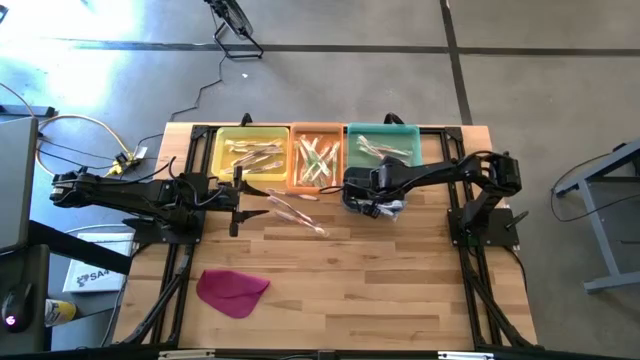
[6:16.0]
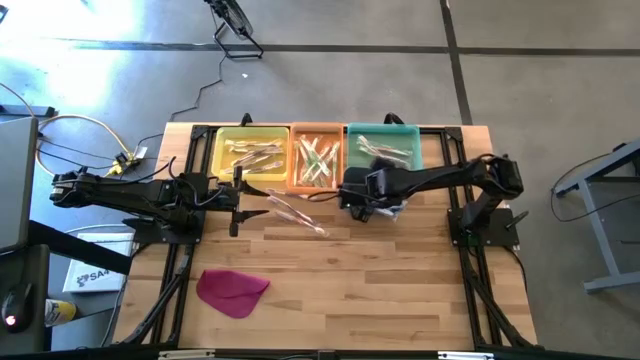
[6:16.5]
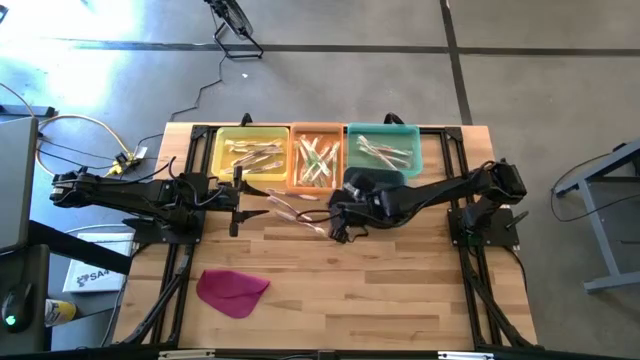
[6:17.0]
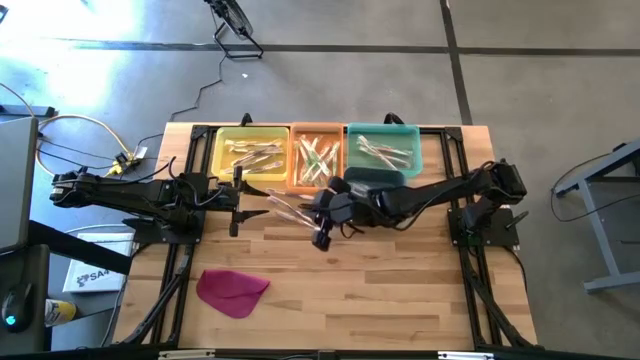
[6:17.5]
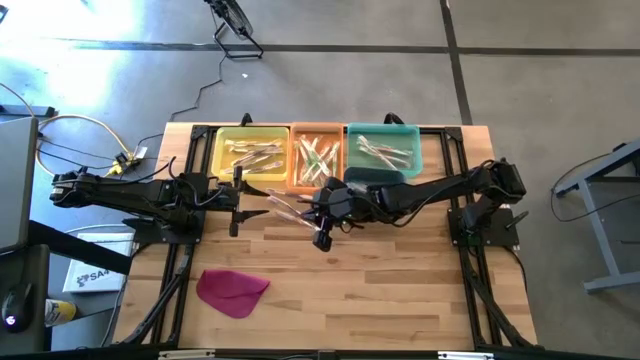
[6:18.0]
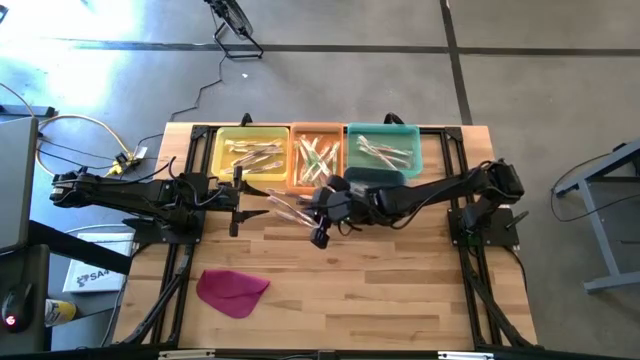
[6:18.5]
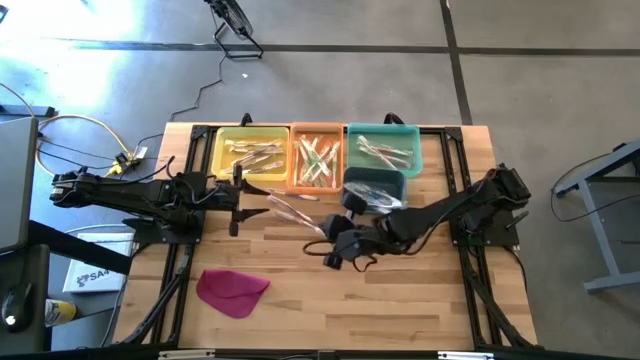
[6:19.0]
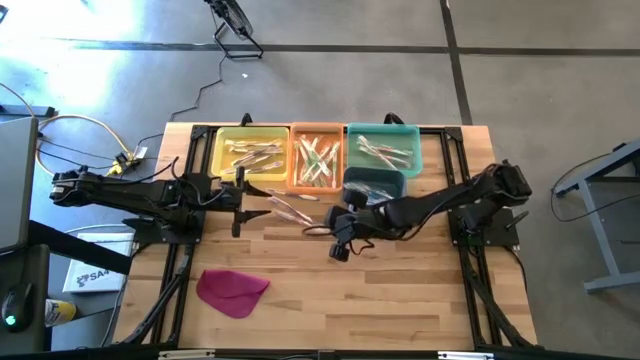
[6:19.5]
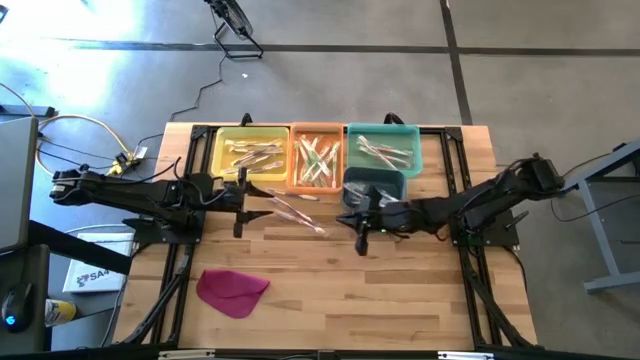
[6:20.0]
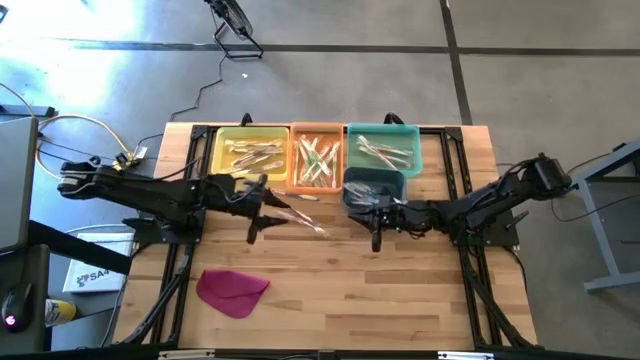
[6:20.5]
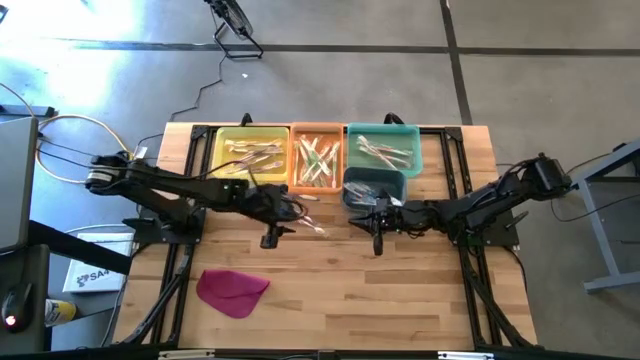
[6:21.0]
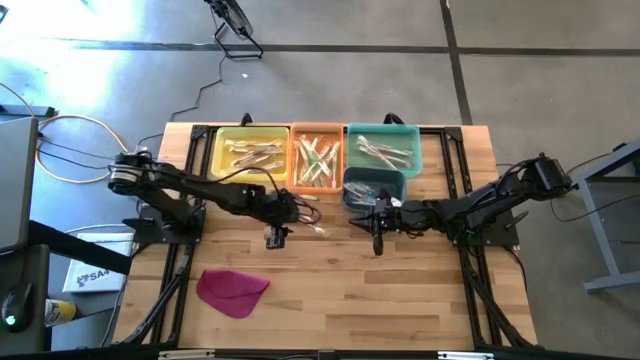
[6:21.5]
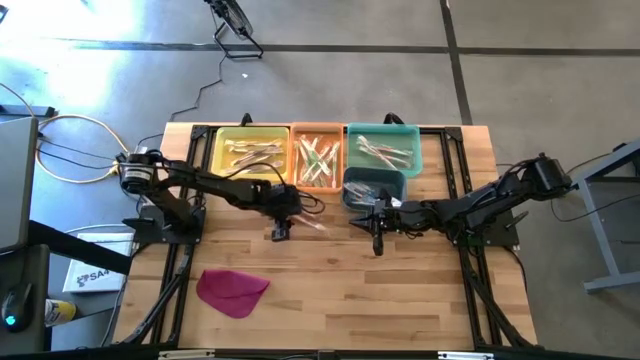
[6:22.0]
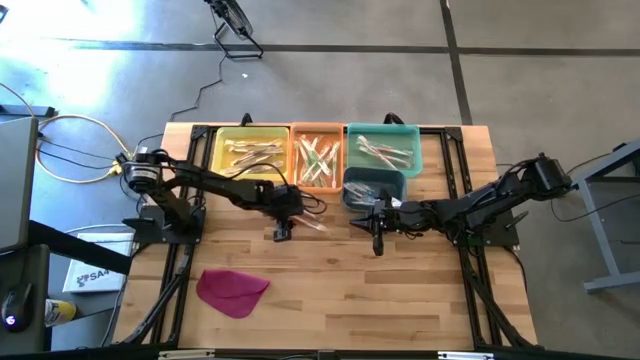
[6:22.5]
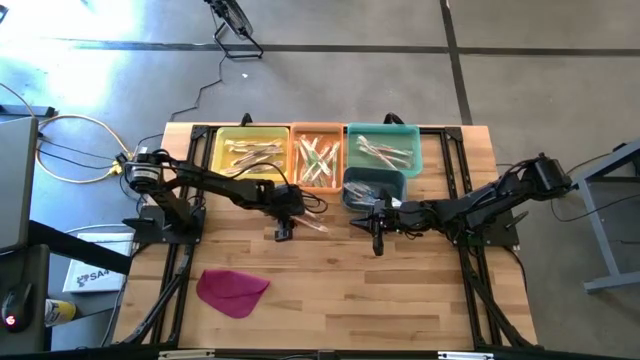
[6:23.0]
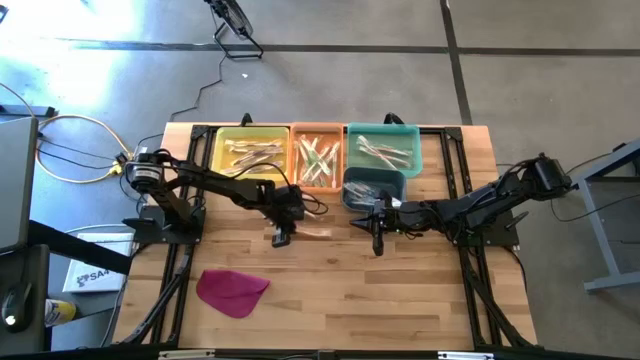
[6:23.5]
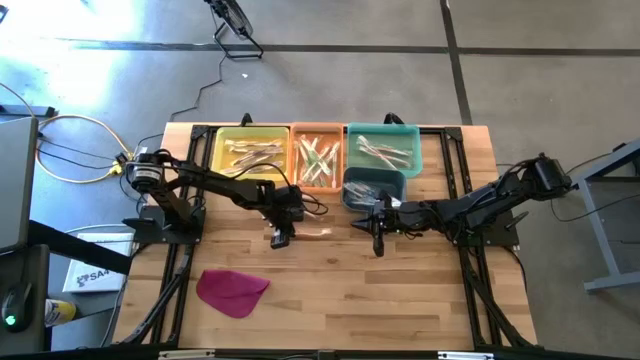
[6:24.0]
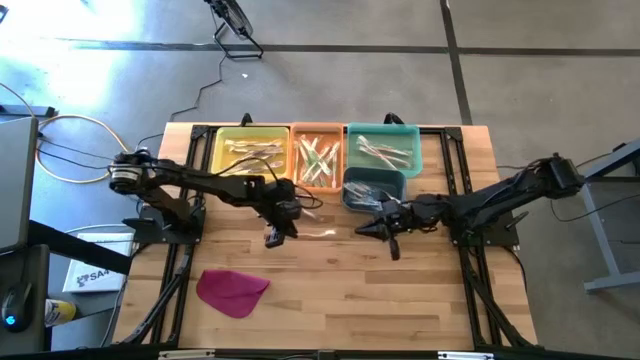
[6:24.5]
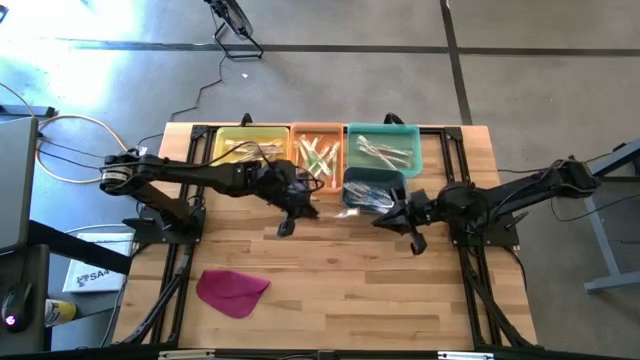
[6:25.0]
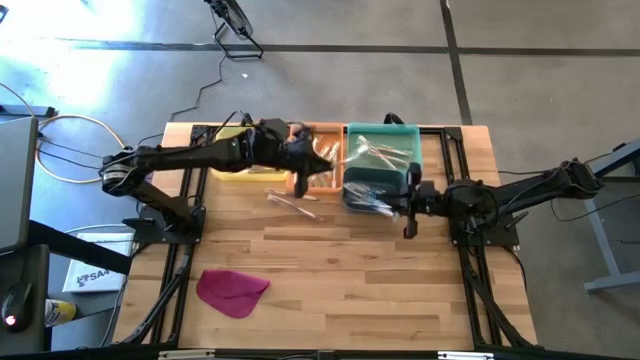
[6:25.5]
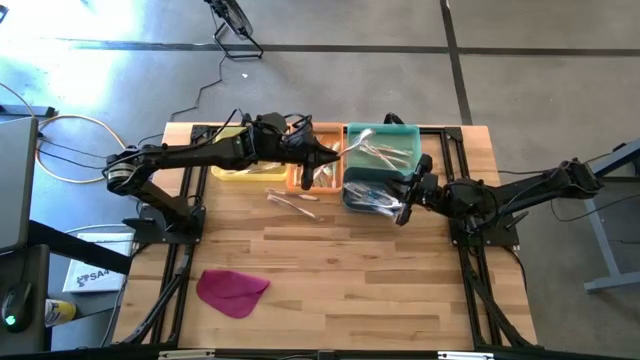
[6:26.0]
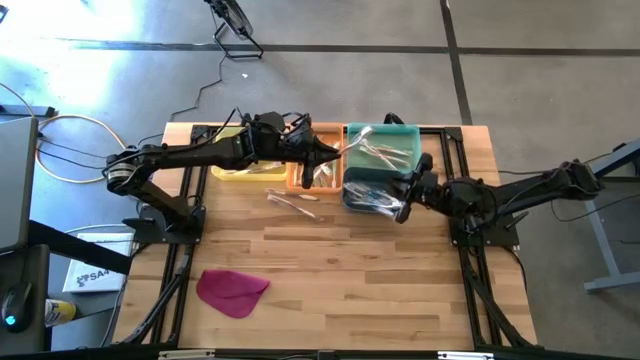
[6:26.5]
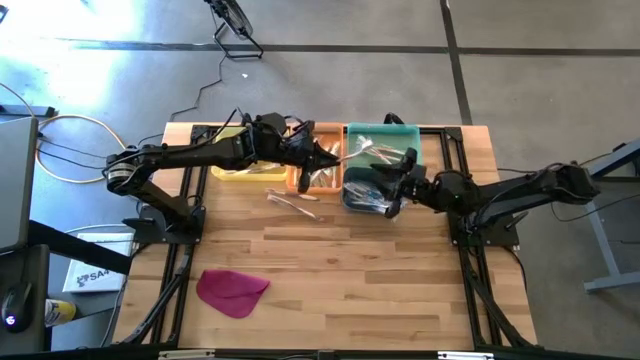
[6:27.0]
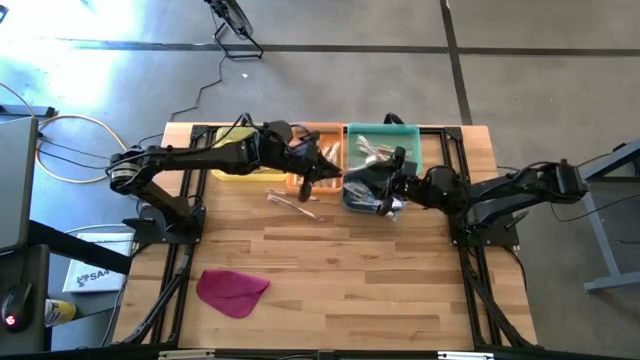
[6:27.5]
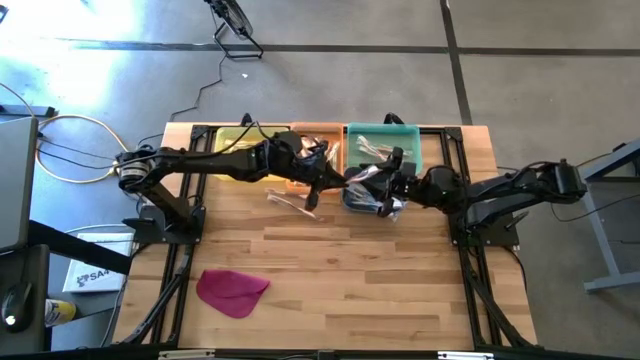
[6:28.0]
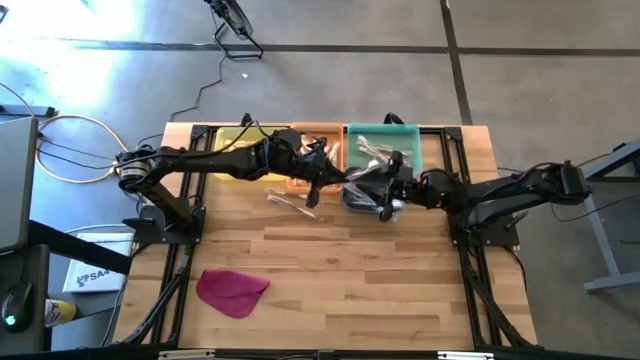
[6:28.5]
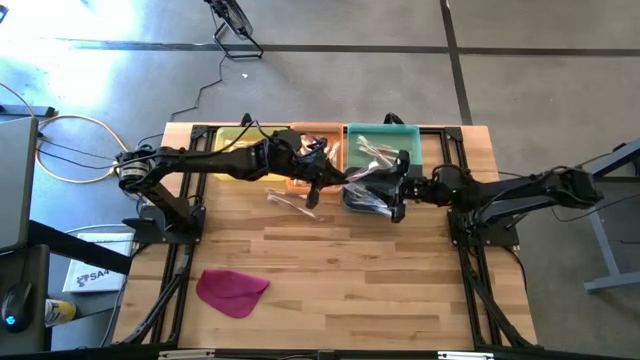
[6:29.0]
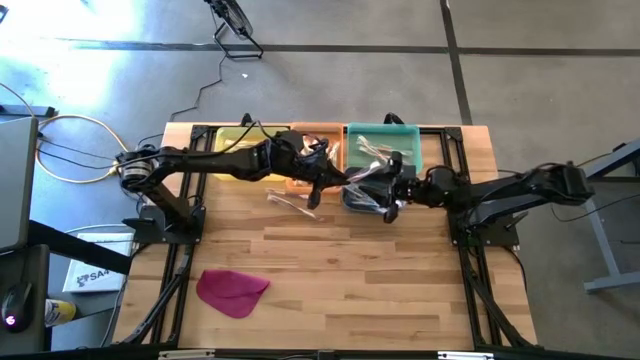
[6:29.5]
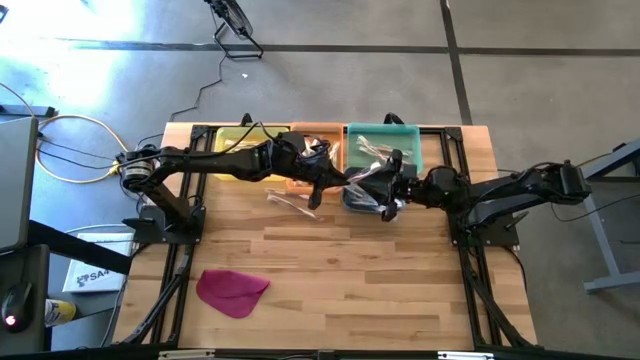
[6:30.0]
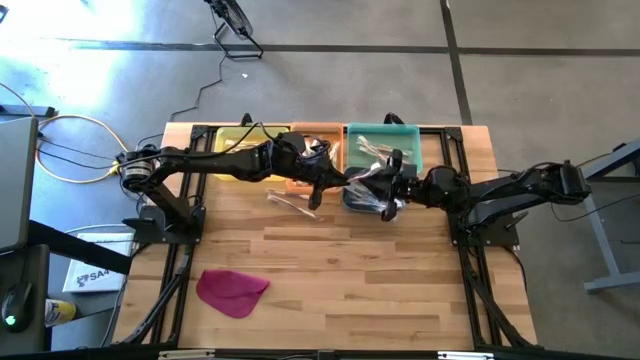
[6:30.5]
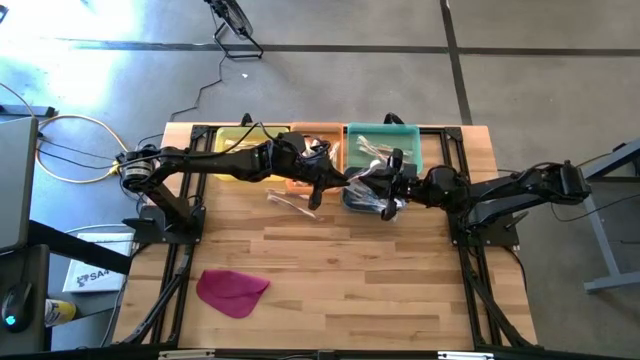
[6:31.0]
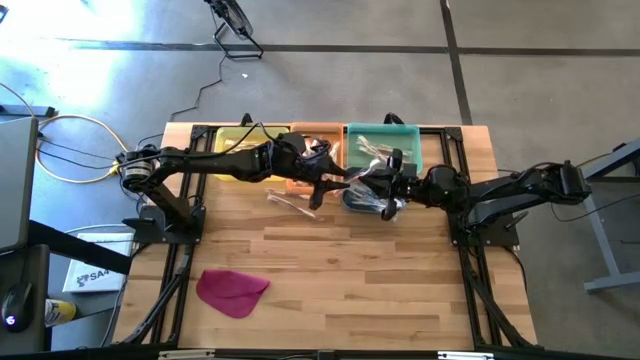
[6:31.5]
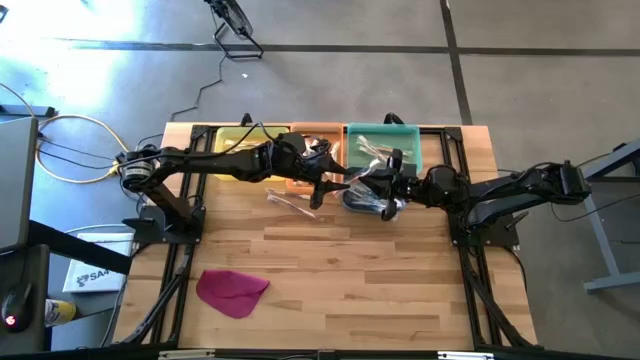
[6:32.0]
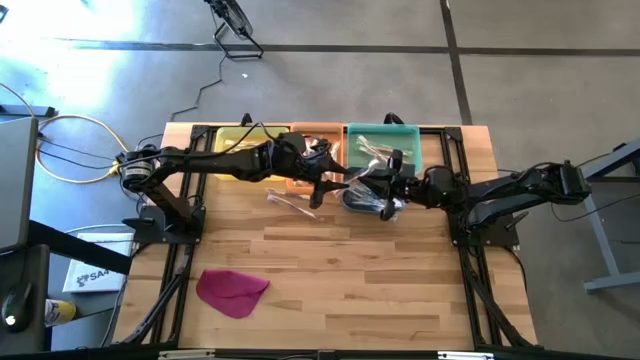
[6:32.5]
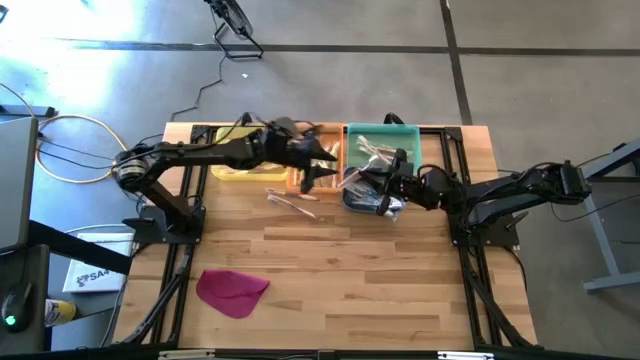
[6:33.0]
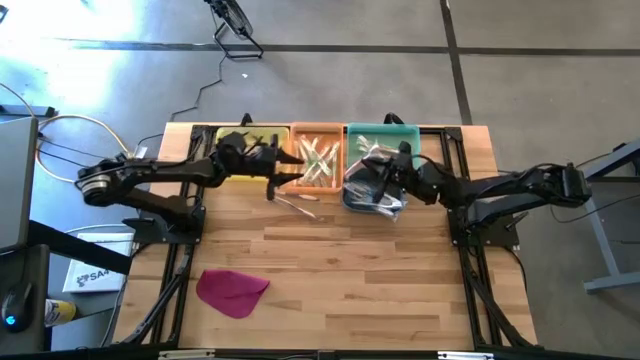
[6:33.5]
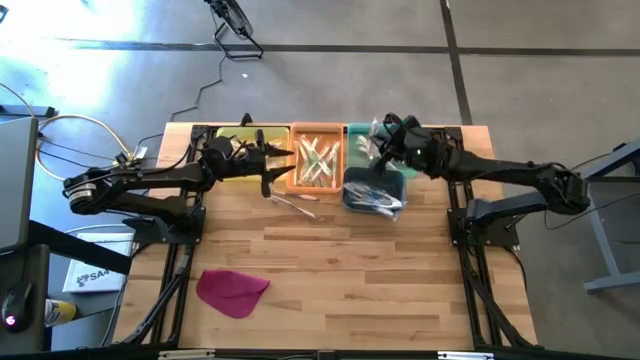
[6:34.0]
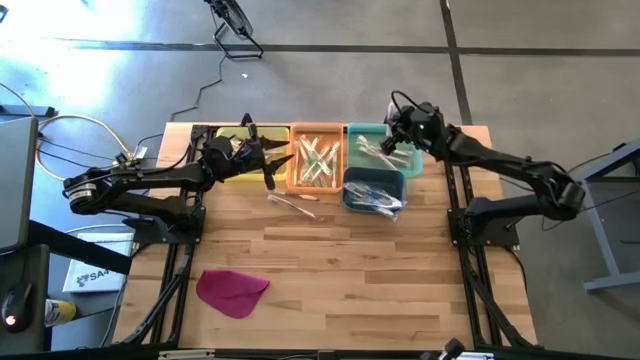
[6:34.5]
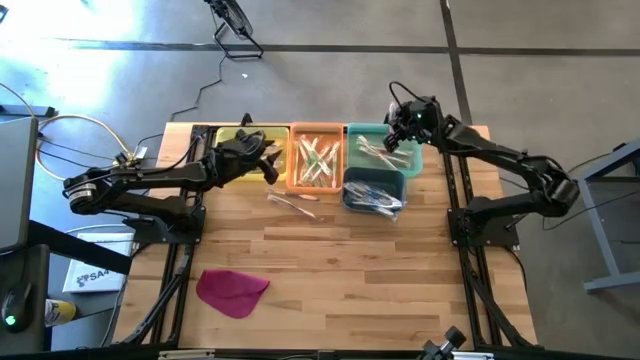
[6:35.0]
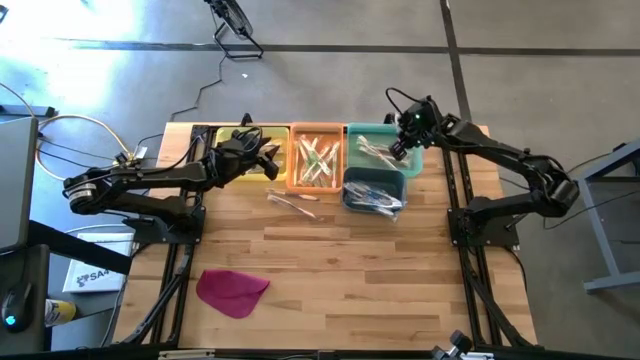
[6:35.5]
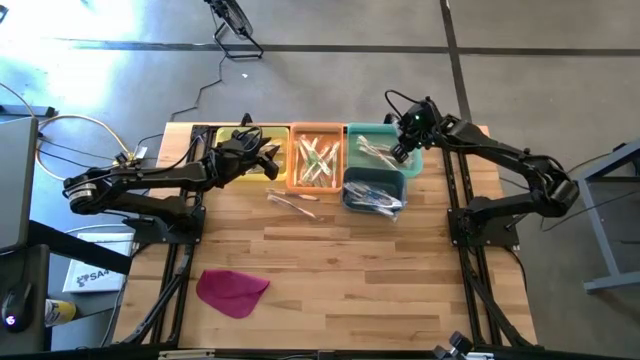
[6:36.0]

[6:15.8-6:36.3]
Task: Pick & Place Toothbrushes
Put the orange toothbrush into the blue bin

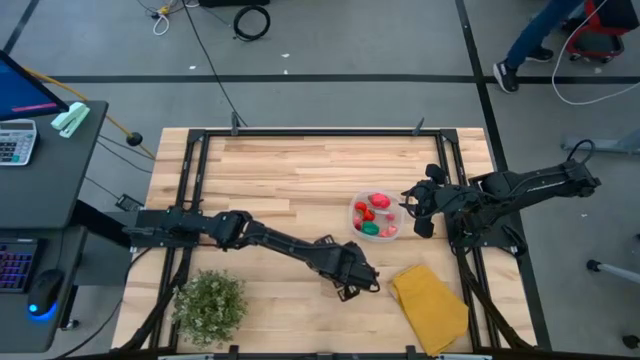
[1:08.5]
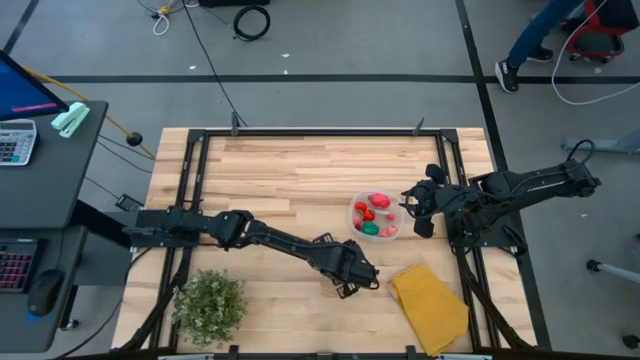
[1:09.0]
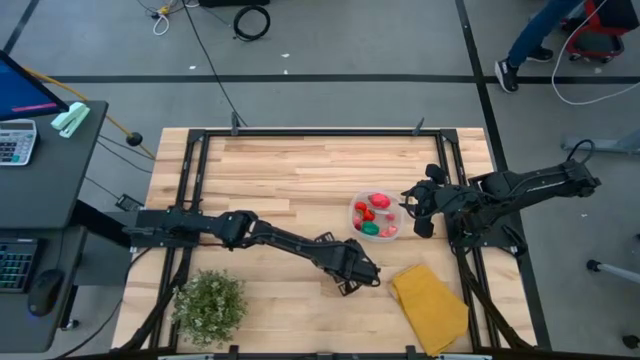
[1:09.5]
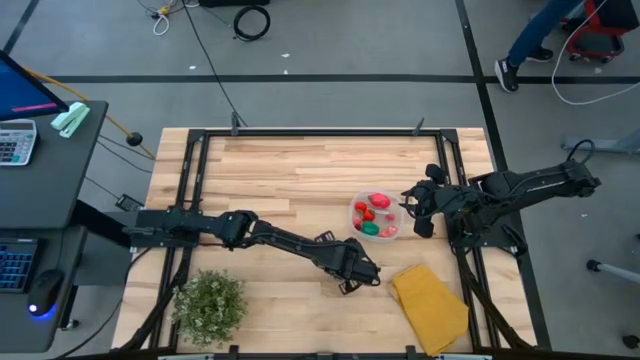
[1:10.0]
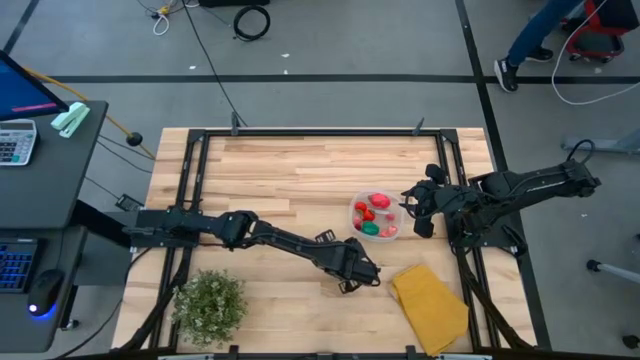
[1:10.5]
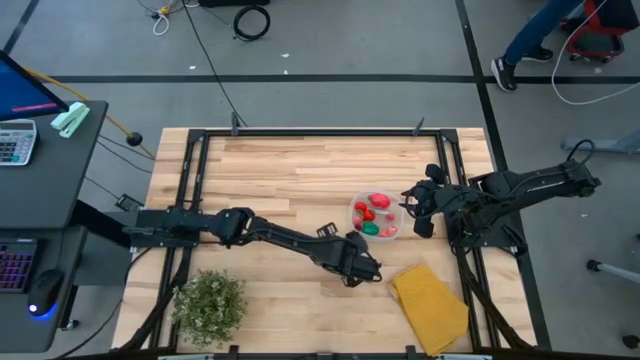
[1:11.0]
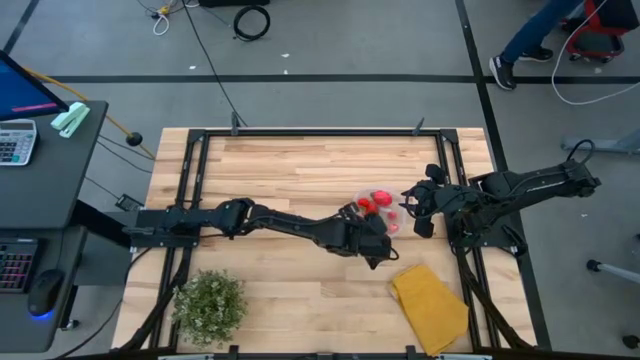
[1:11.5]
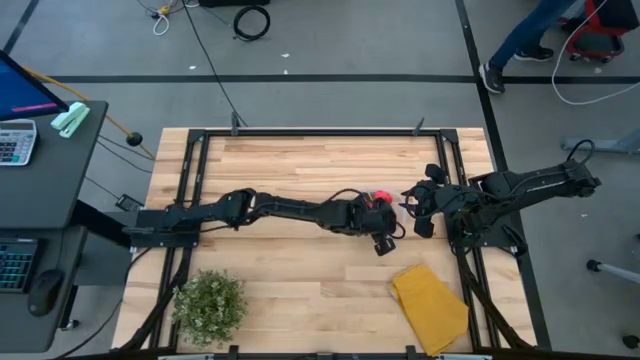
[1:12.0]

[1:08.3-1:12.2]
Task: Pick and placing Produce into tupperware
Put the red cherry into the transparent container
